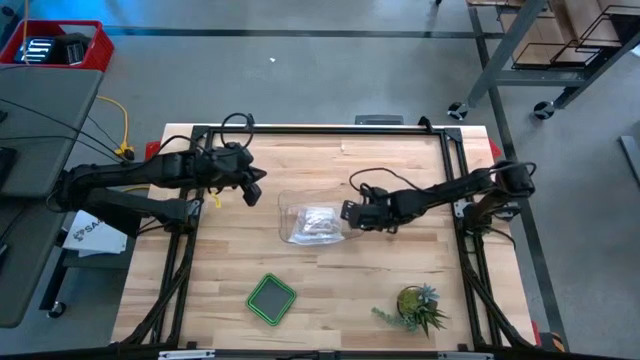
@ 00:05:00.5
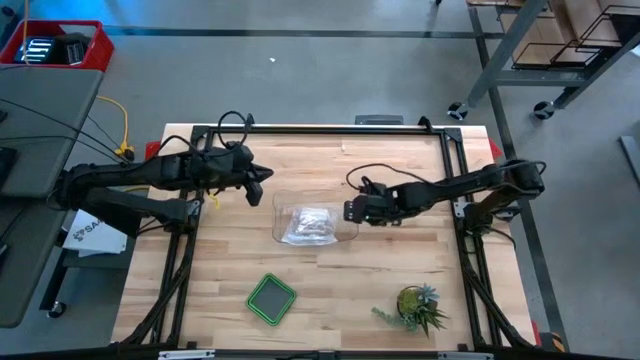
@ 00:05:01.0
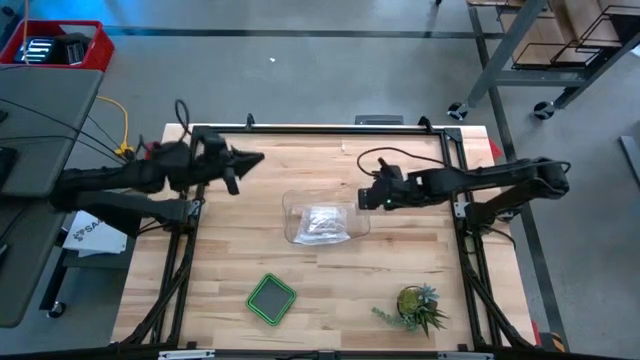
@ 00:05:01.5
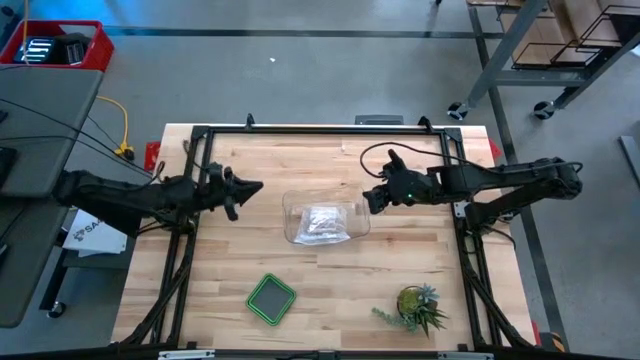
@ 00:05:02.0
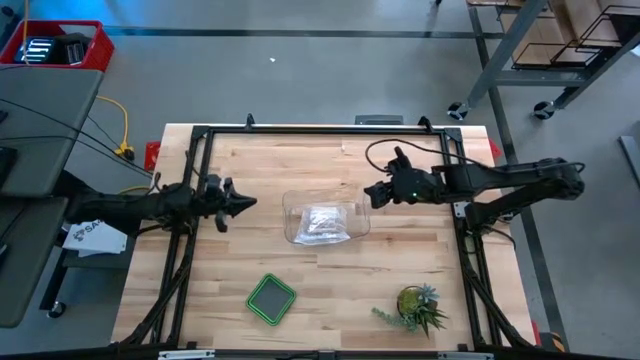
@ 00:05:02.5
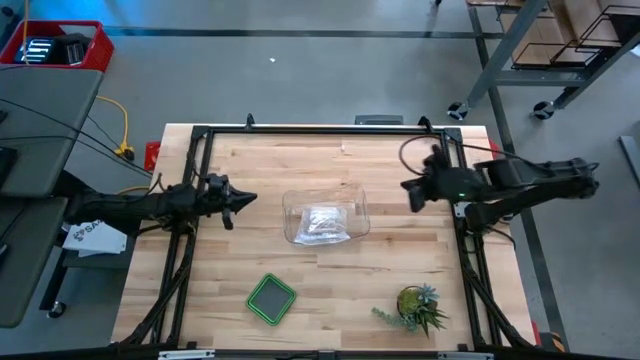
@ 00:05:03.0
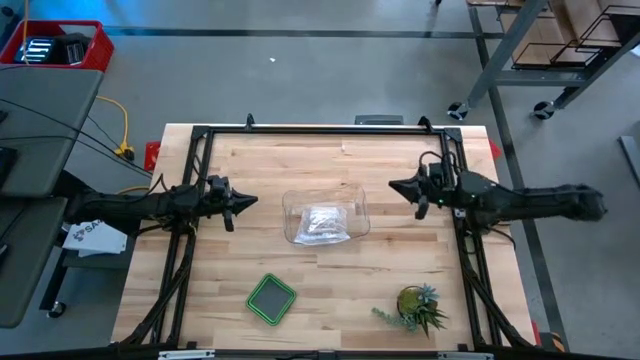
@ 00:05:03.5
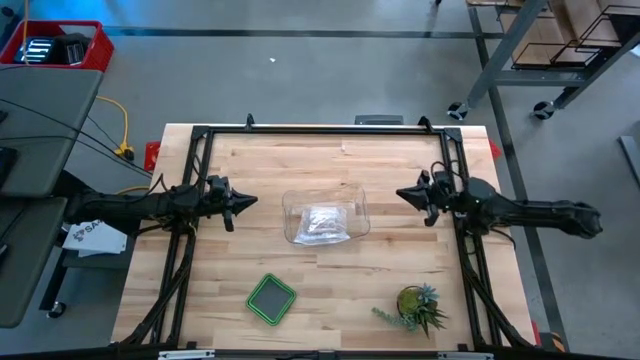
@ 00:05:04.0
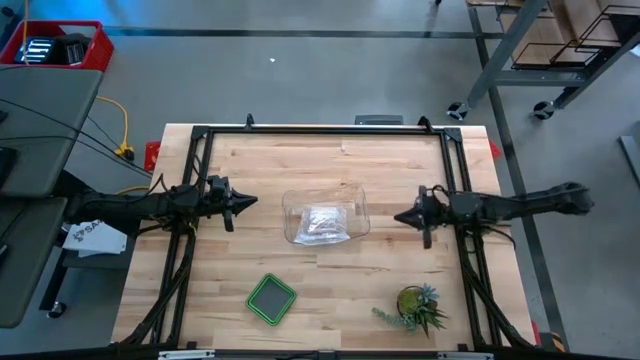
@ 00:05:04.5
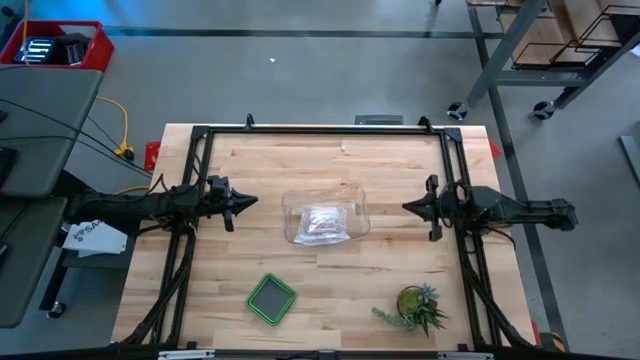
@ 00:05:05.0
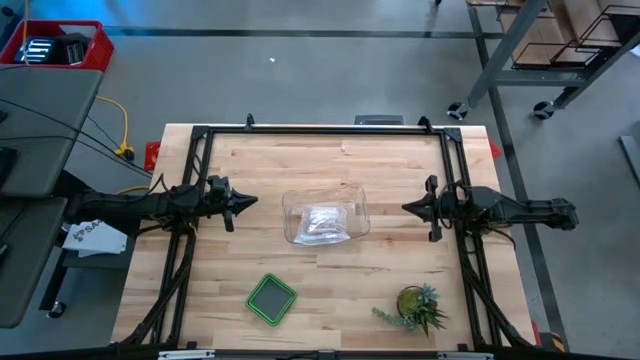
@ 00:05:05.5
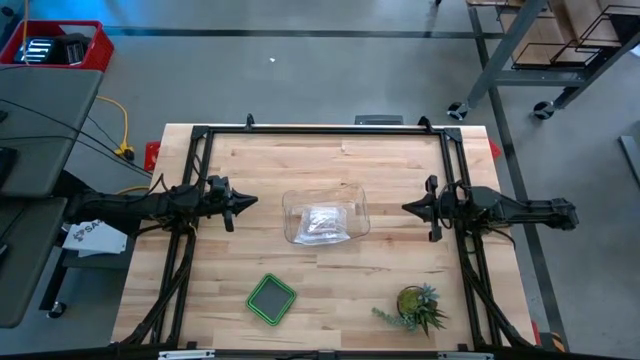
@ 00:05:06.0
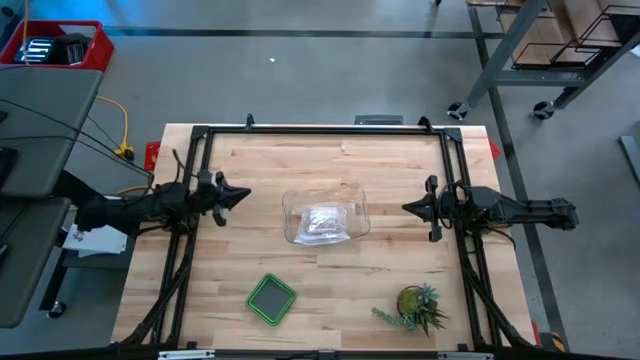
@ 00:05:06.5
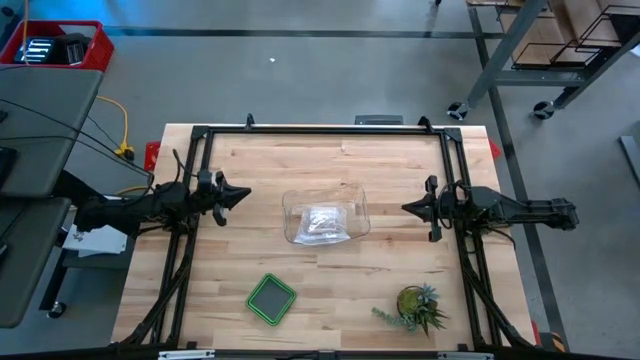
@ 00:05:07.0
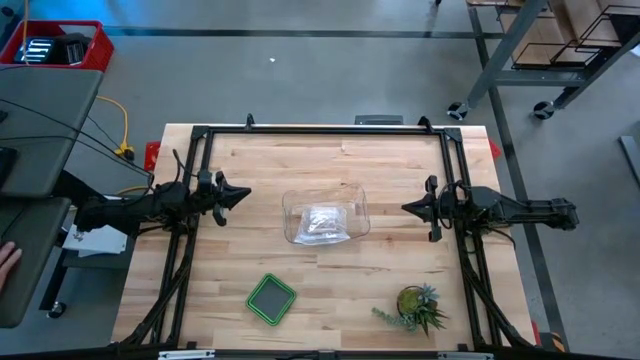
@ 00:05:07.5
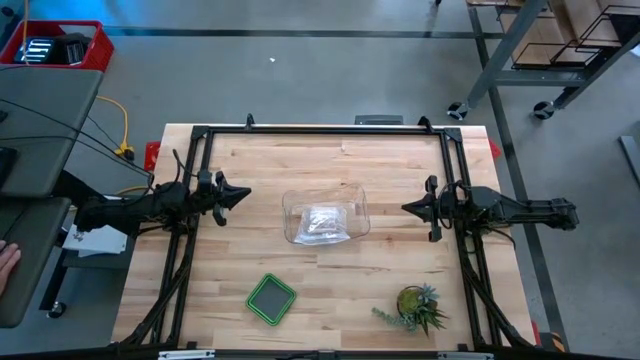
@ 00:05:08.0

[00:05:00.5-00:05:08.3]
Task: Roll bandage
Return to Home Position

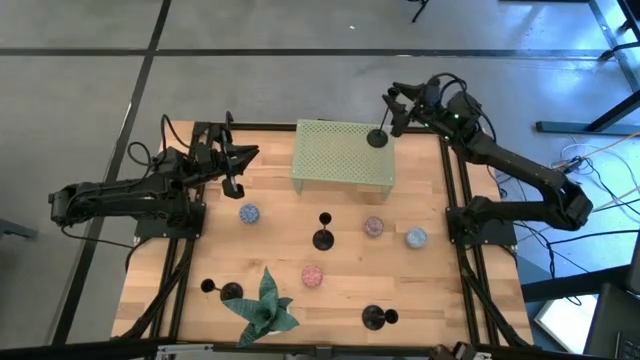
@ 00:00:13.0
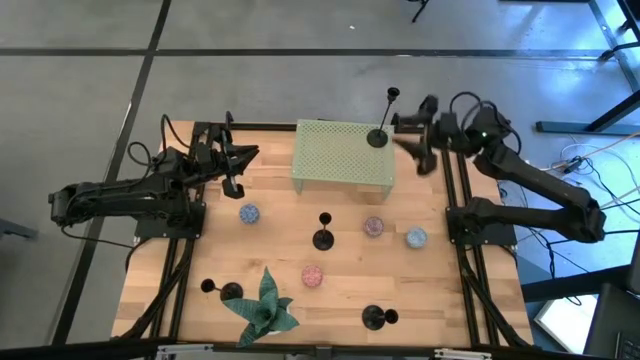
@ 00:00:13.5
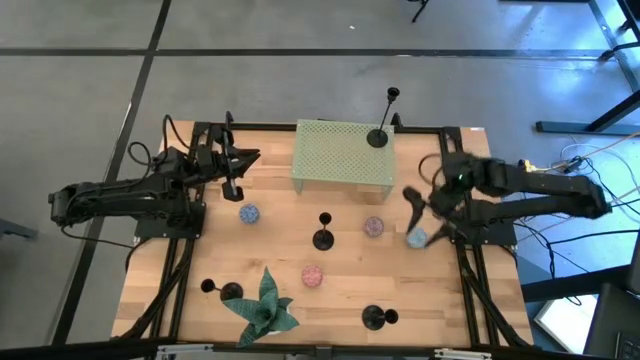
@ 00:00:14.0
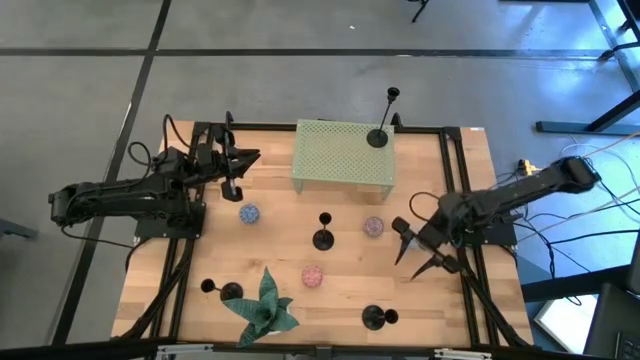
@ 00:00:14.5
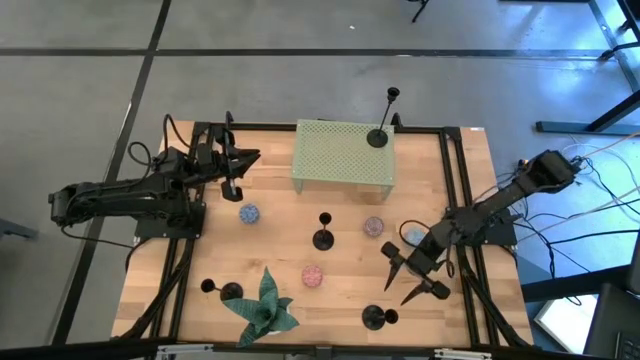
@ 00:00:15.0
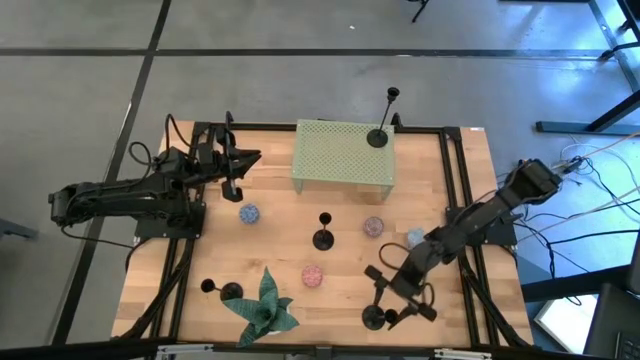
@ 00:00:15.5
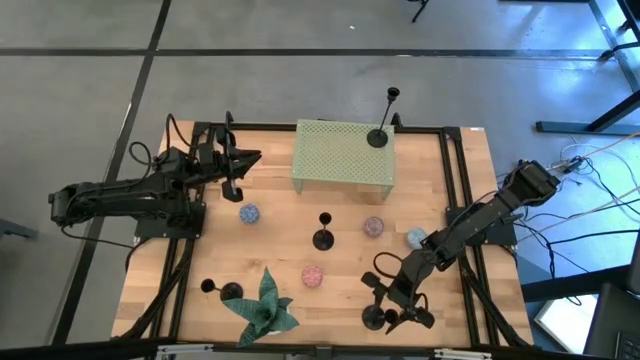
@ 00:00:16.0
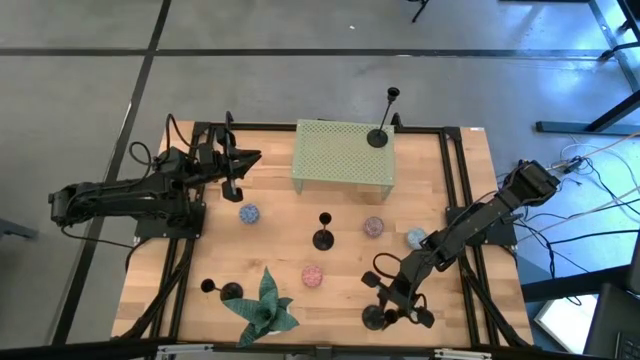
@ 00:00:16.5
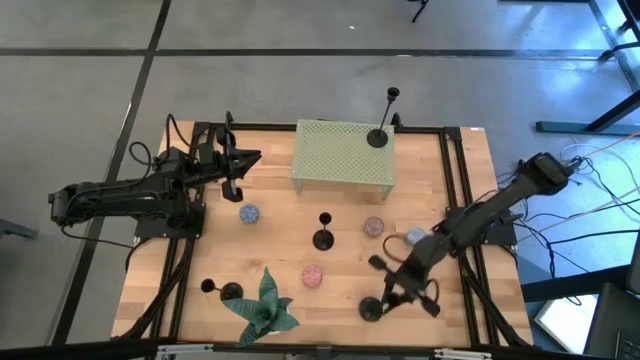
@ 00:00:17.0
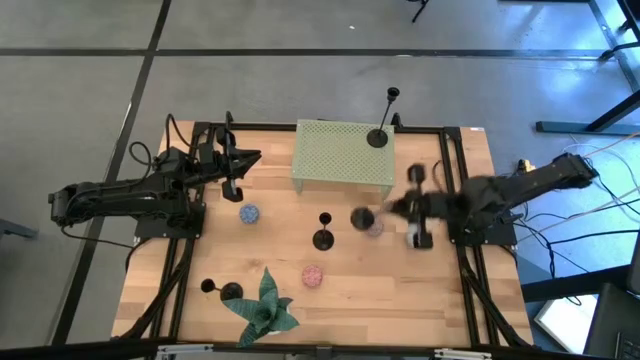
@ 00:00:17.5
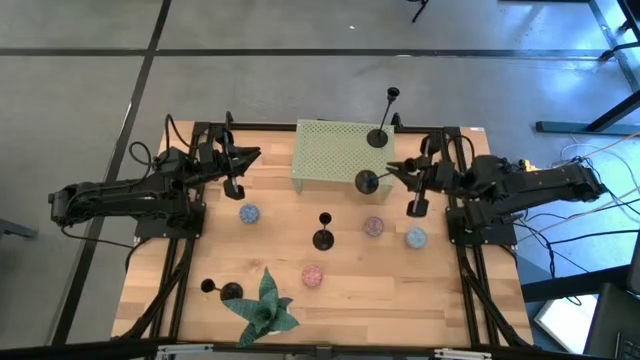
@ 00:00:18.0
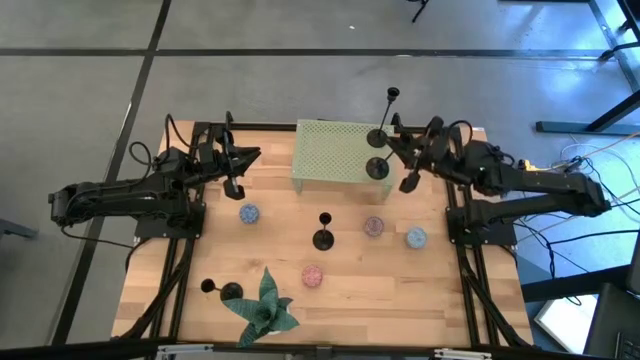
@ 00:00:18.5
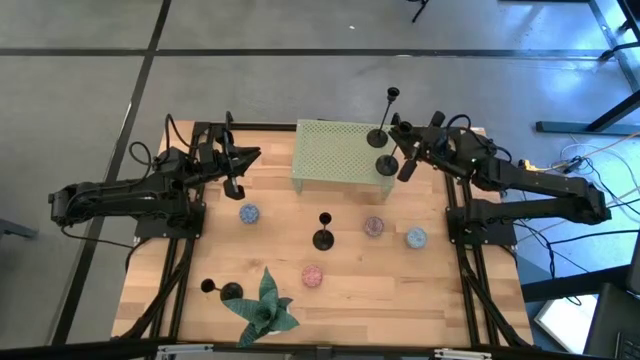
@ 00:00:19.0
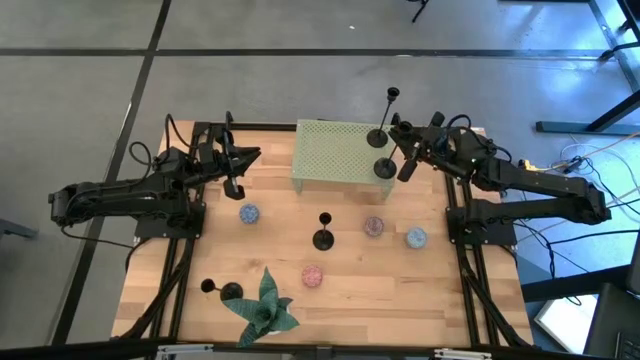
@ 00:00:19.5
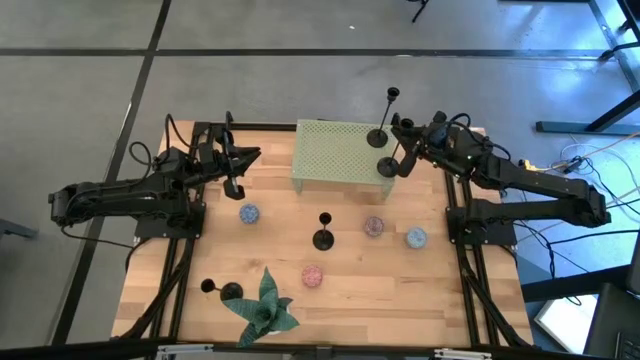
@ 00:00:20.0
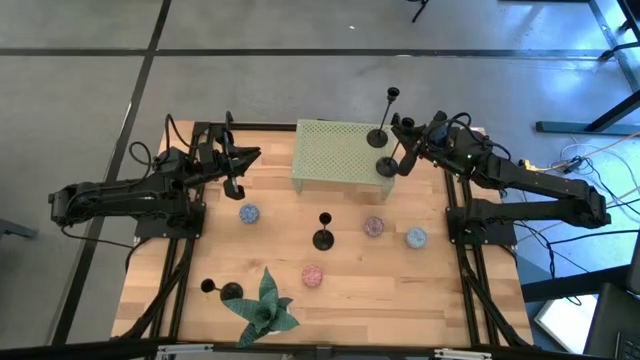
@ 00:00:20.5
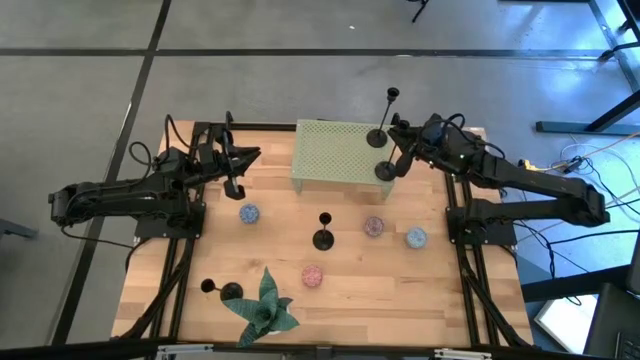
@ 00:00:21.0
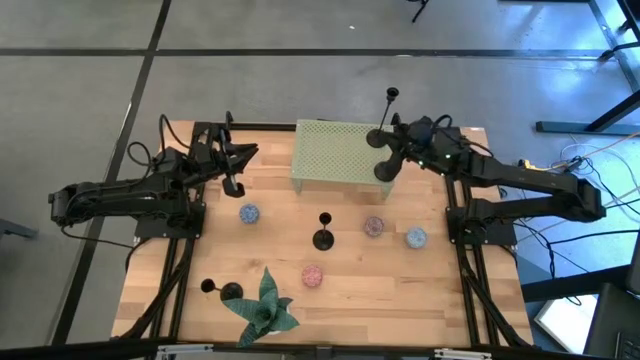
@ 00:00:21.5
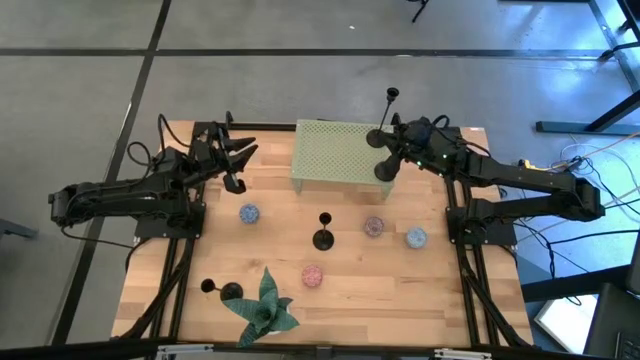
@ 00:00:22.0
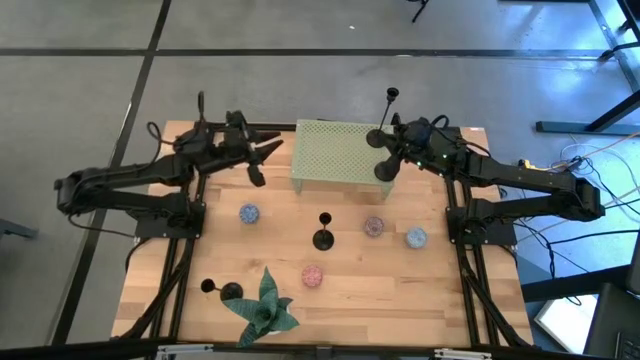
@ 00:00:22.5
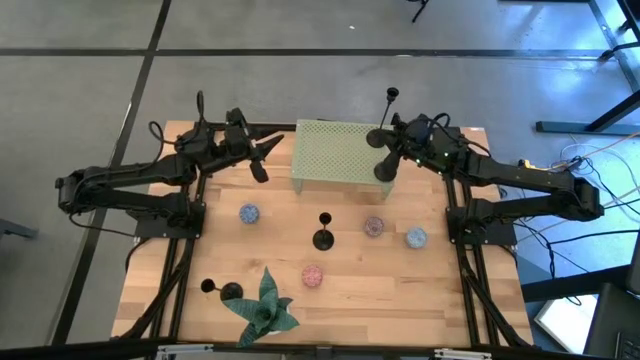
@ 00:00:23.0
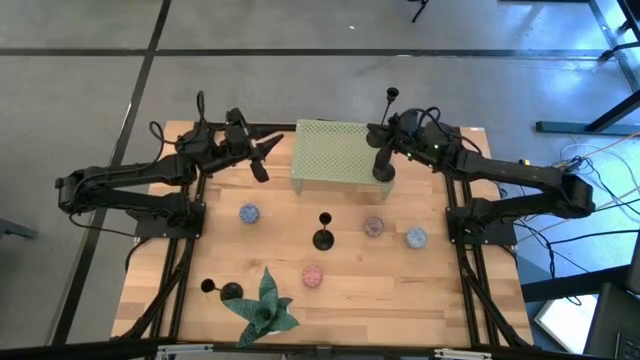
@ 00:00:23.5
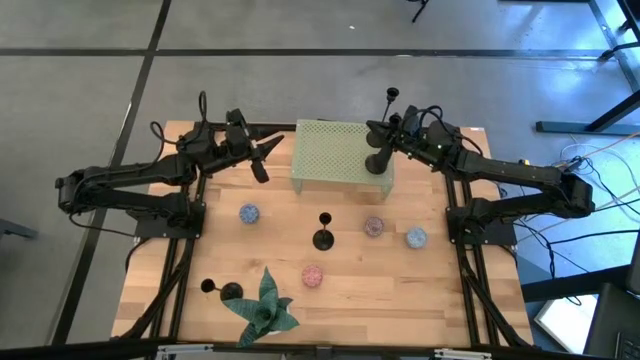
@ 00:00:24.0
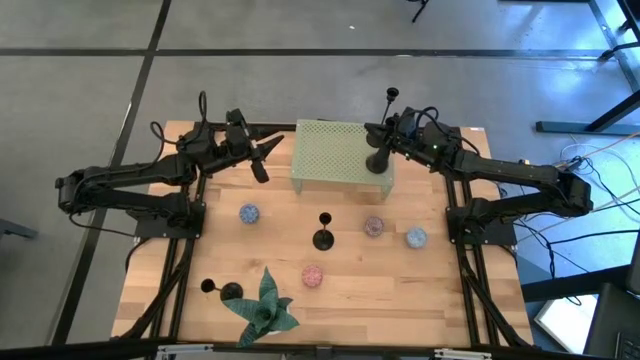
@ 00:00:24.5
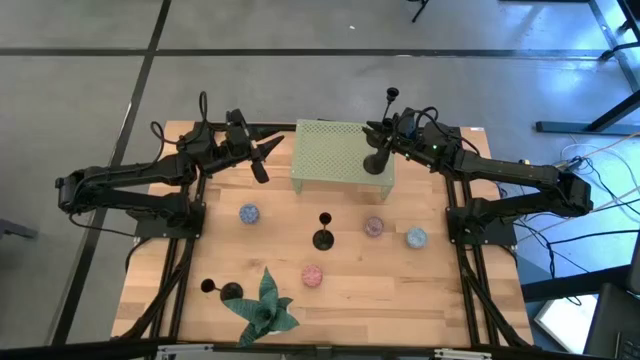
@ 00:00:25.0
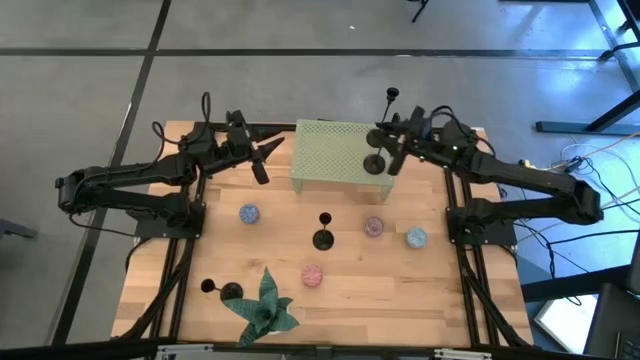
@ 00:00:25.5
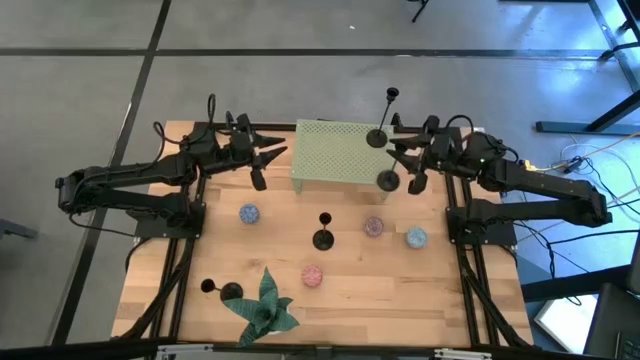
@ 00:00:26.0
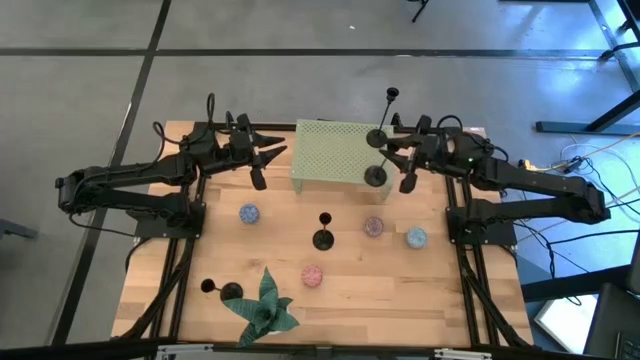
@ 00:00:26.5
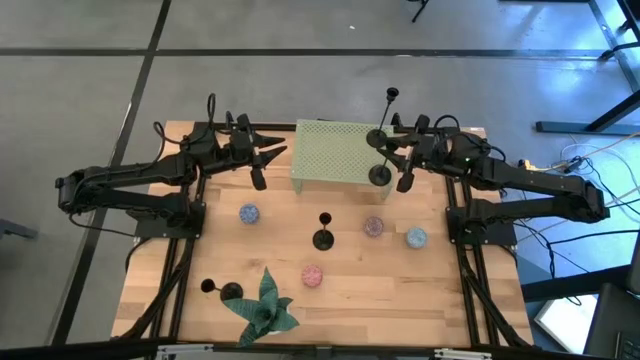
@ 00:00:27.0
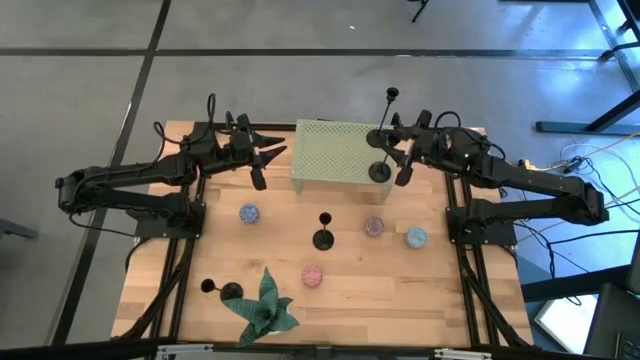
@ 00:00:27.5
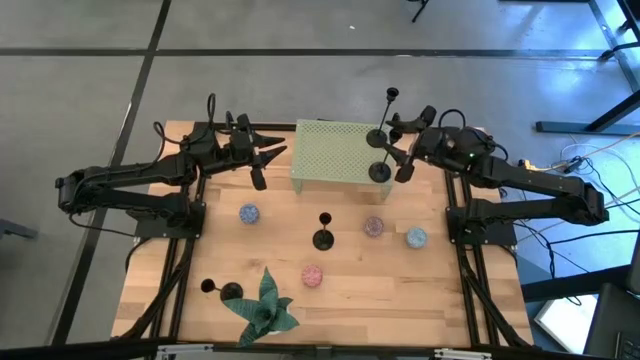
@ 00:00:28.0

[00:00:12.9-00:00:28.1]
Task: Pick & Place candle stick holders
Put the black candle holder on the shelf
